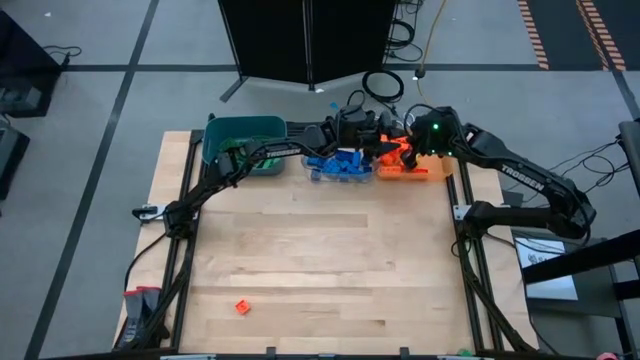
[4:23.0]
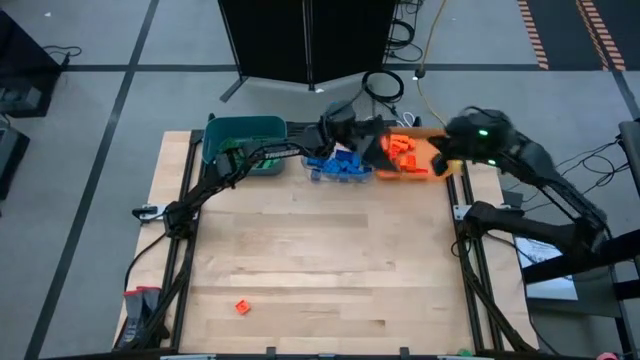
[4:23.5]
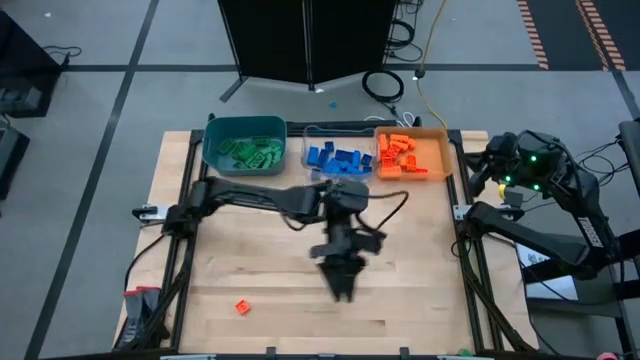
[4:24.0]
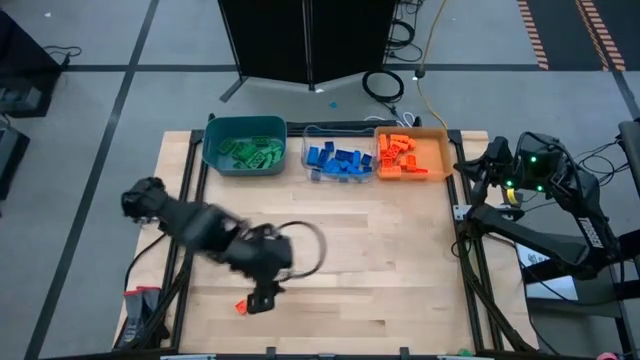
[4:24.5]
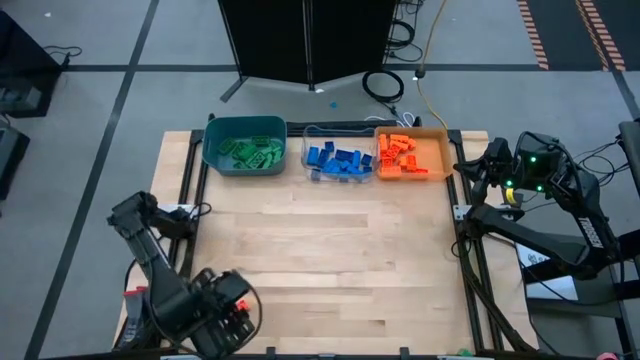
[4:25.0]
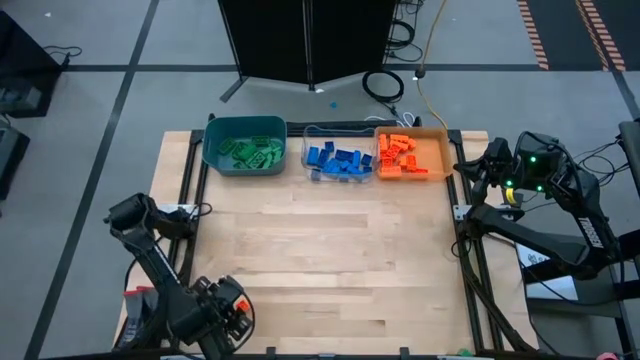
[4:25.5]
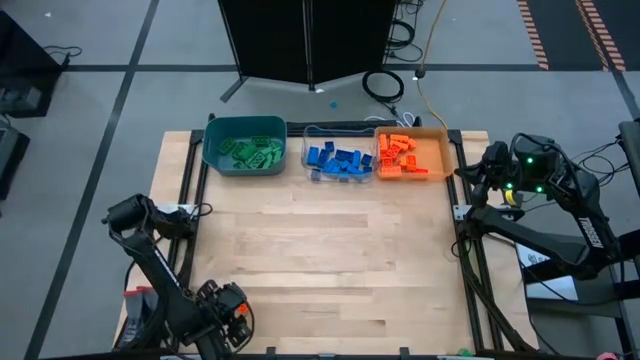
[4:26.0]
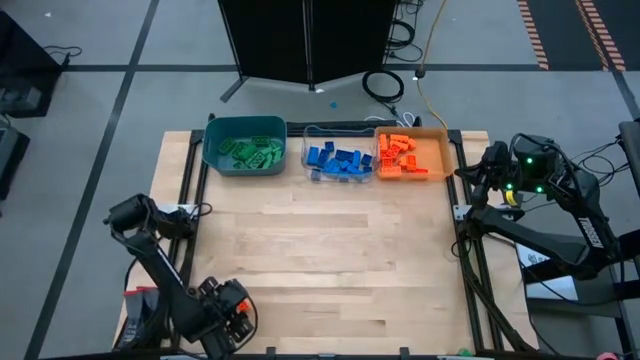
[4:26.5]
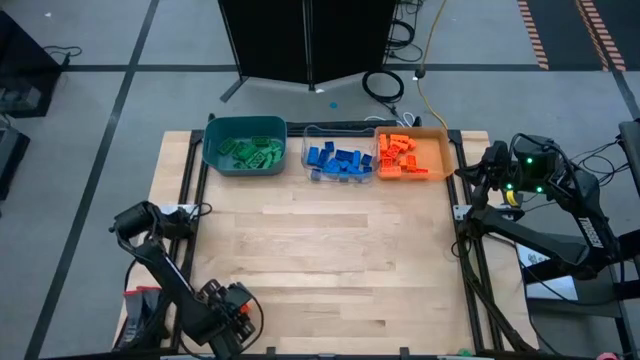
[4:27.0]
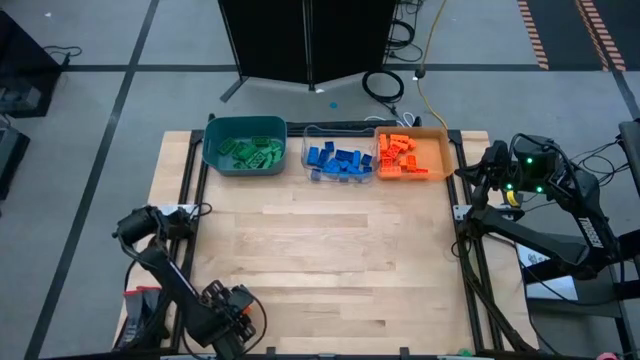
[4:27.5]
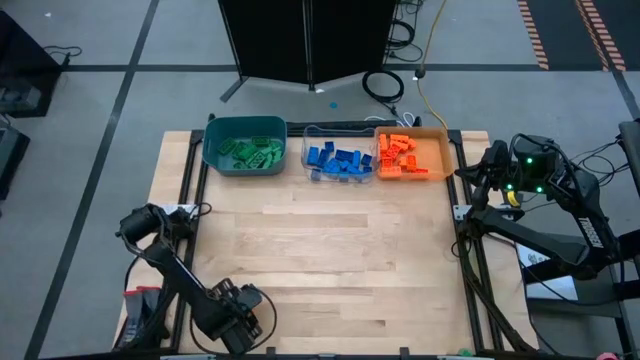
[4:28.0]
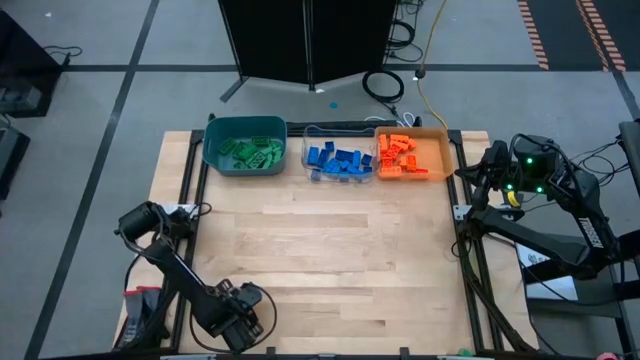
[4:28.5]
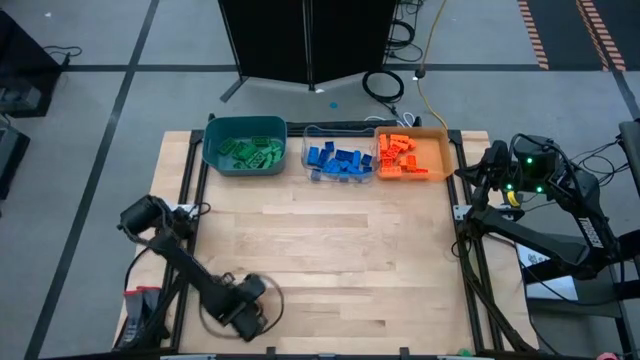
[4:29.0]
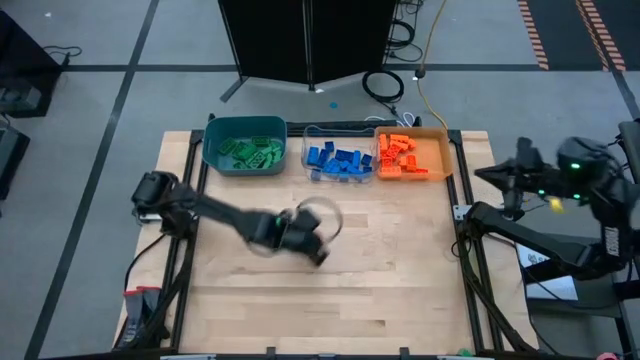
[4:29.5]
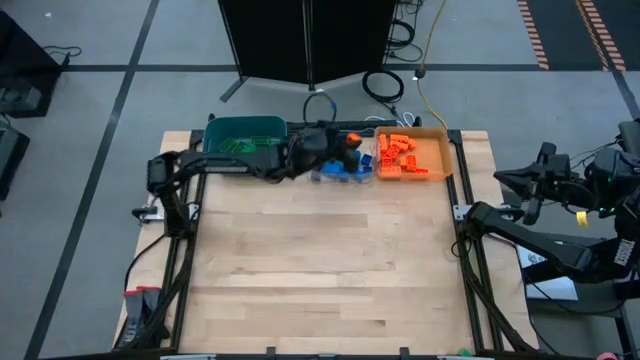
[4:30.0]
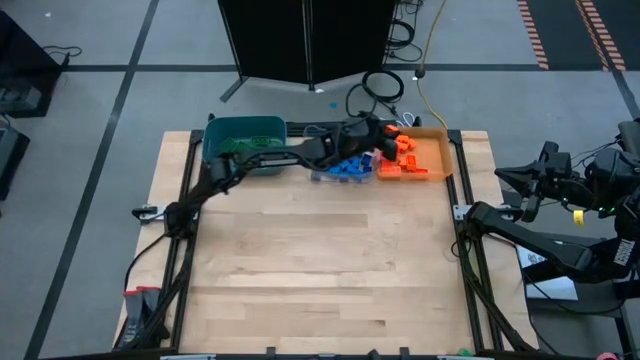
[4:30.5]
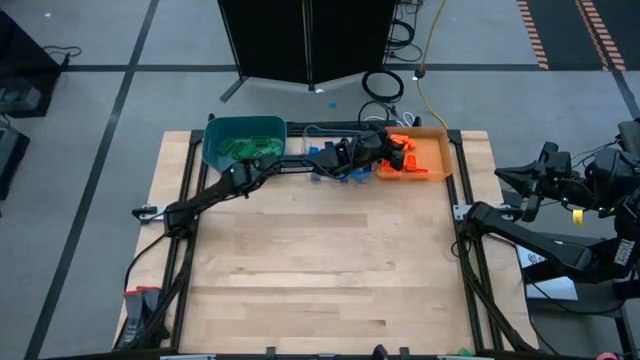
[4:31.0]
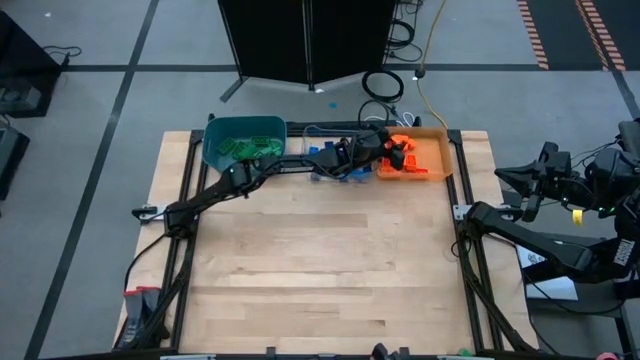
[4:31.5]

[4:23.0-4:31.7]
Task: Sort blocks
Put the orange game piece into the orange transparent bin

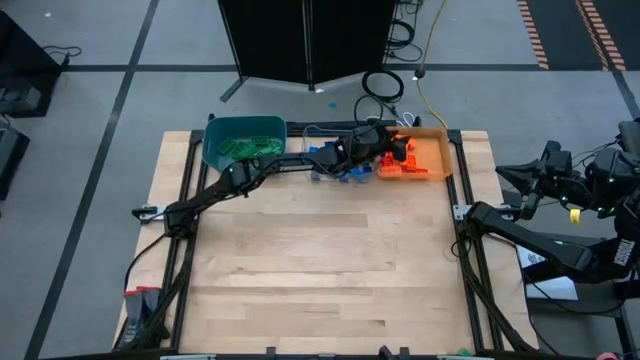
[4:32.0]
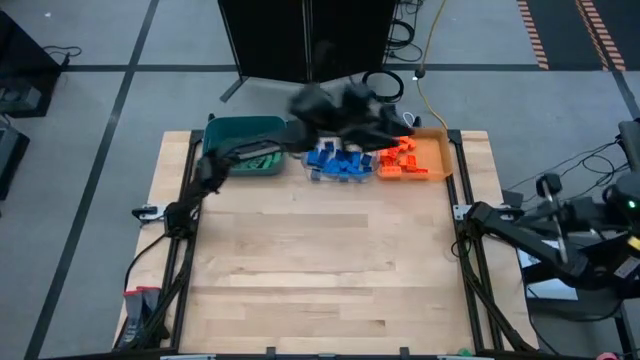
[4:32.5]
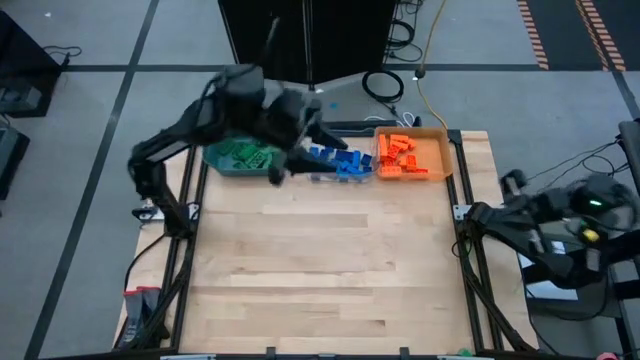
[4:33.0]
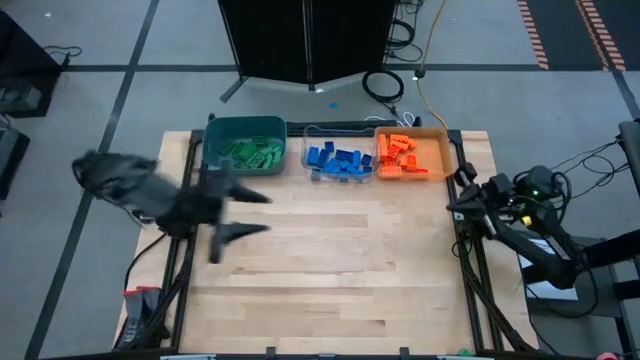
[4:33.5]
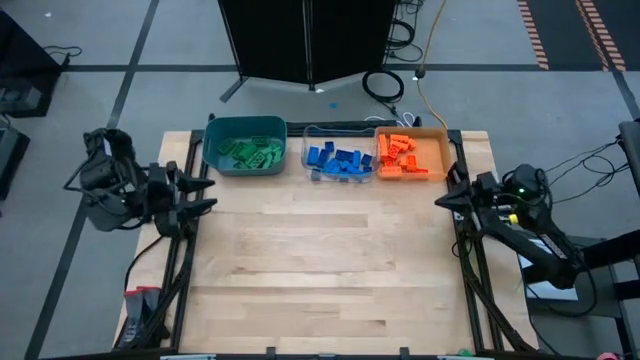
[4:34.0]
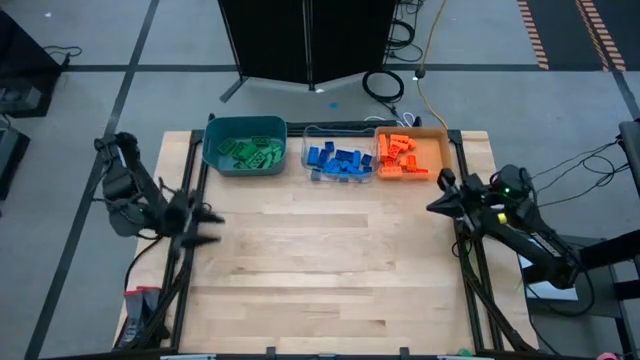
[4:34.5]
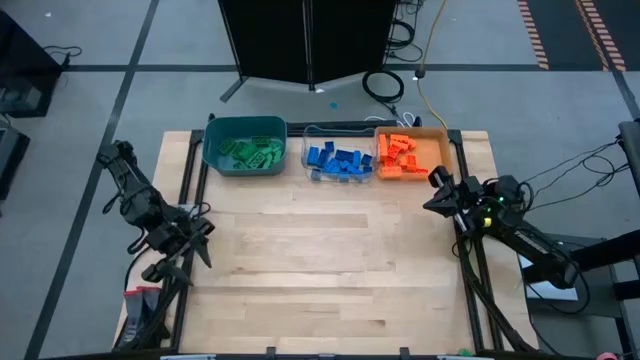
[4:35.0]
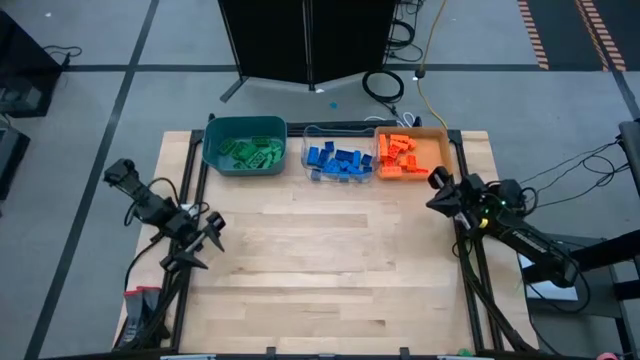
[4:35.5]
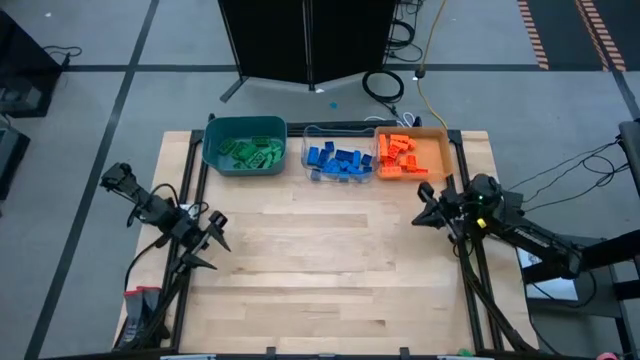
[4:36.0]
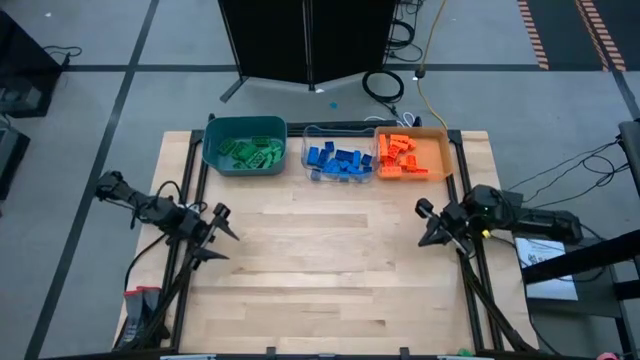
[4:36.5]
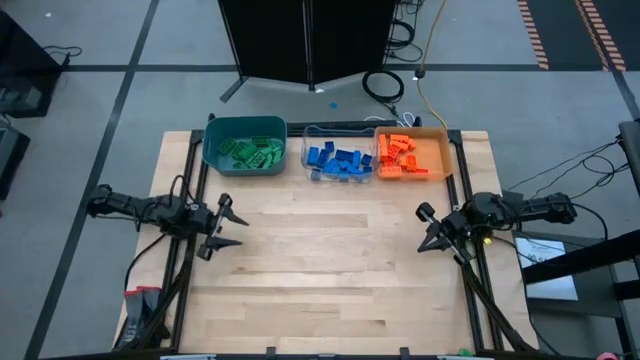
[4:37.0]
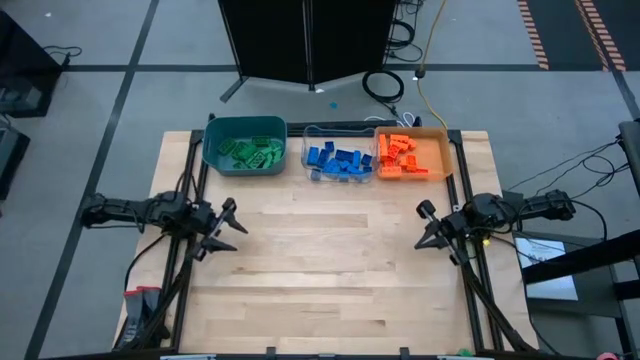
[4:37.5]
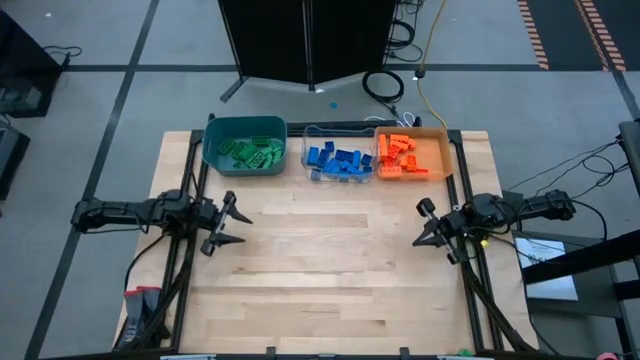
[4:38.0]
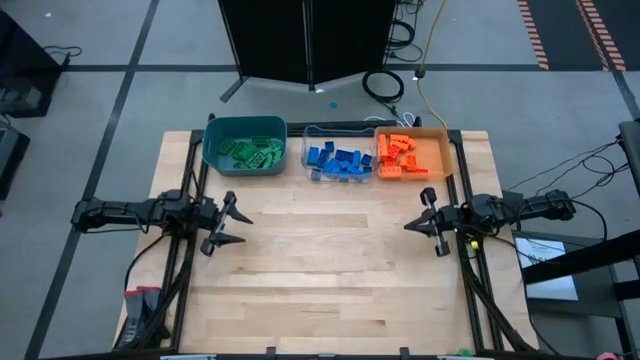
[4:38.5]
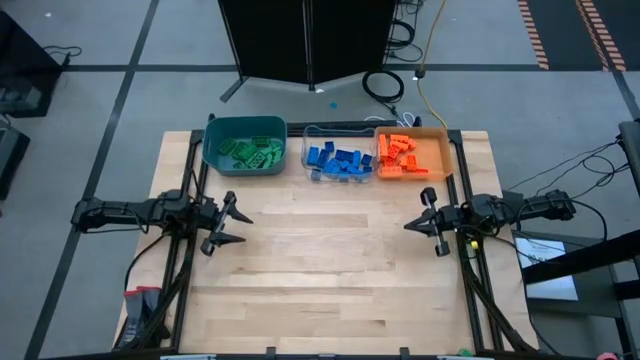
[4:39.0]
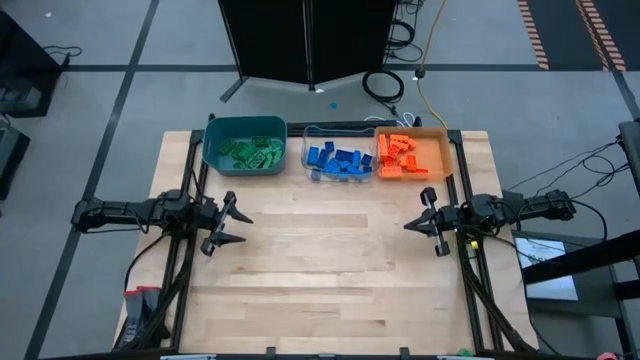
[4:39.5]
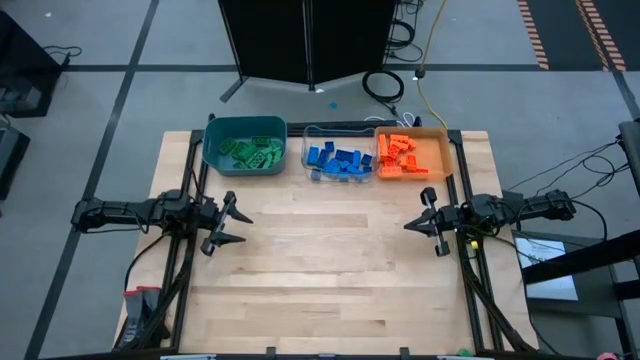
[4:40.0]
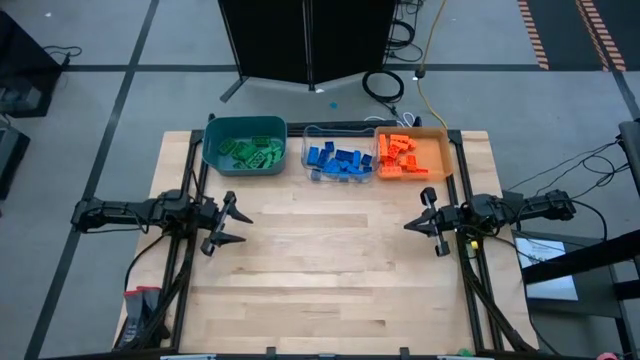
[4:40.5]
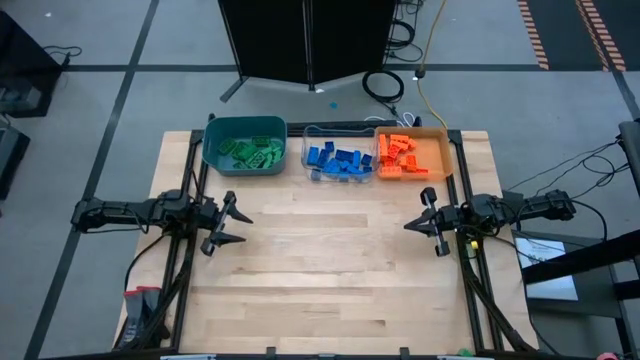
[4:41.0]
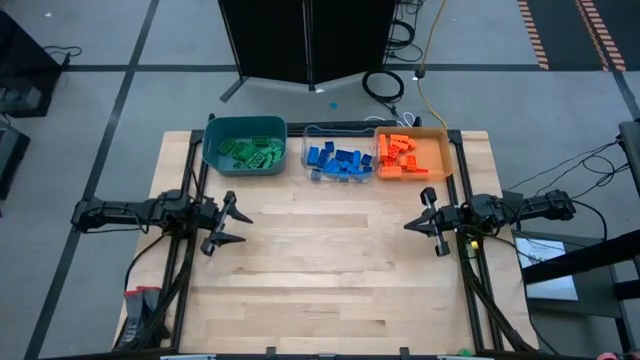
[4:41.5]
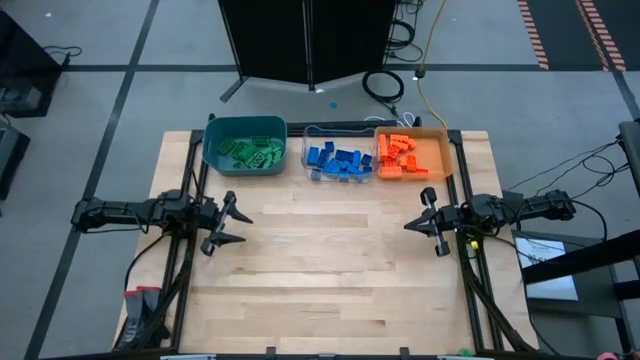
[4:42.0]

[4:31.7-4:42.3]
Return to Home Position
